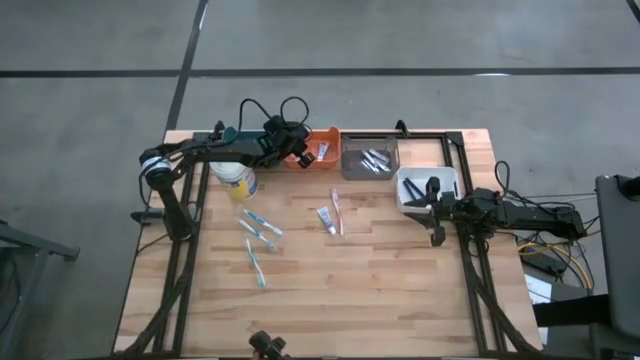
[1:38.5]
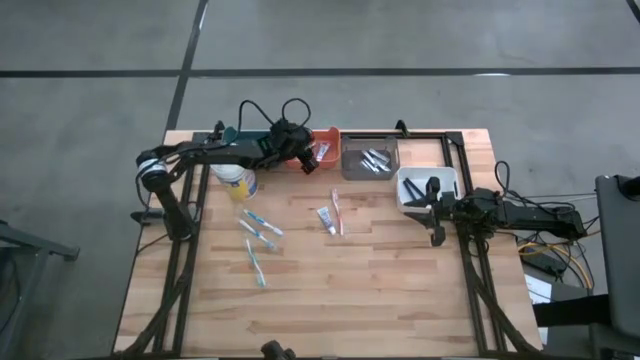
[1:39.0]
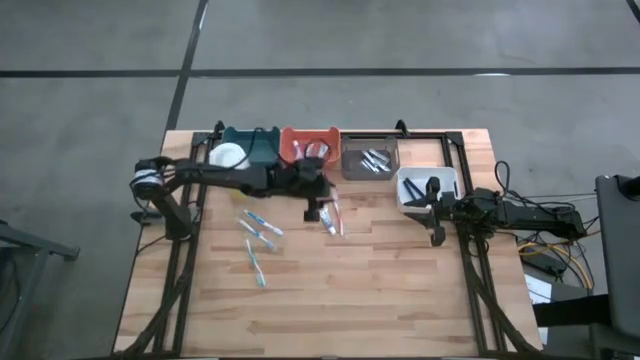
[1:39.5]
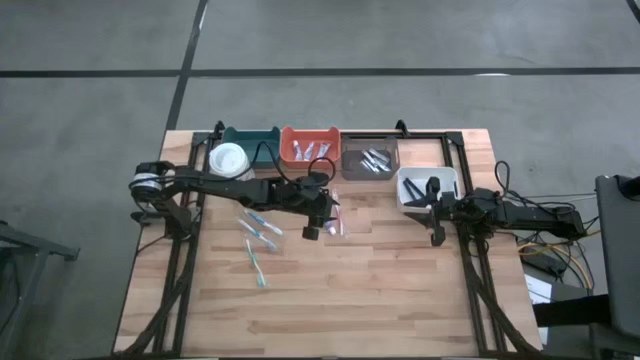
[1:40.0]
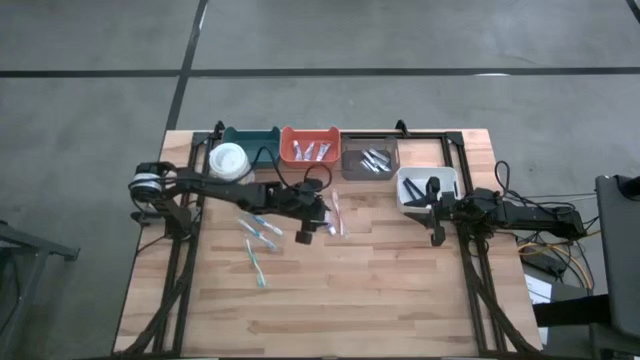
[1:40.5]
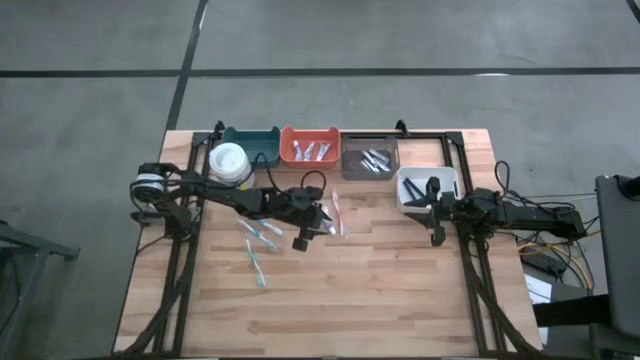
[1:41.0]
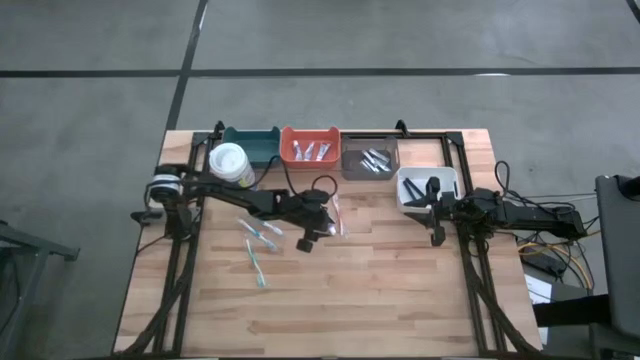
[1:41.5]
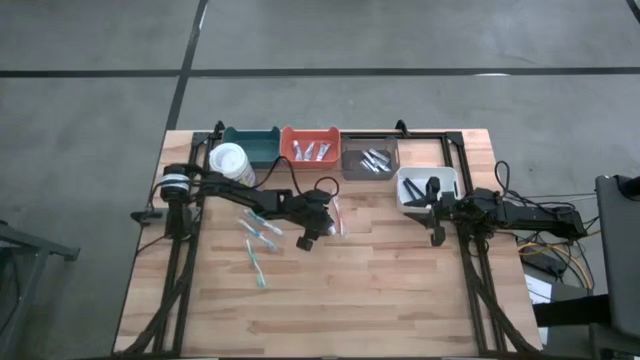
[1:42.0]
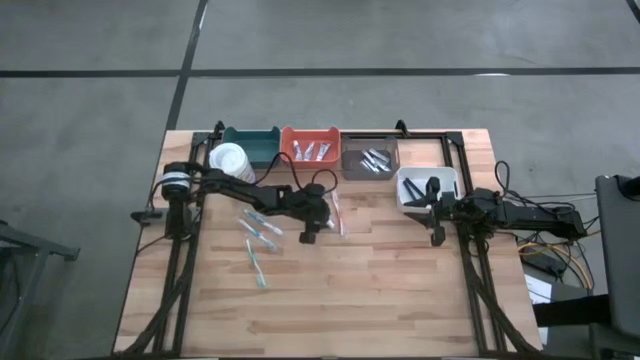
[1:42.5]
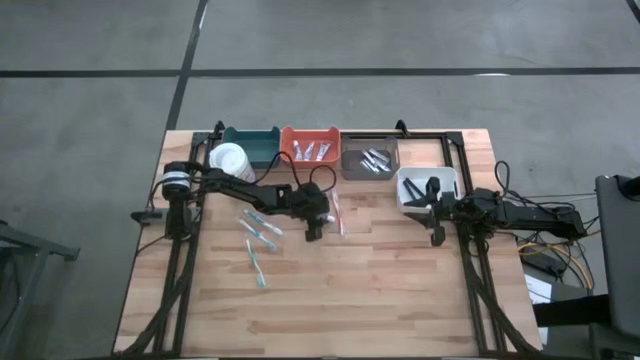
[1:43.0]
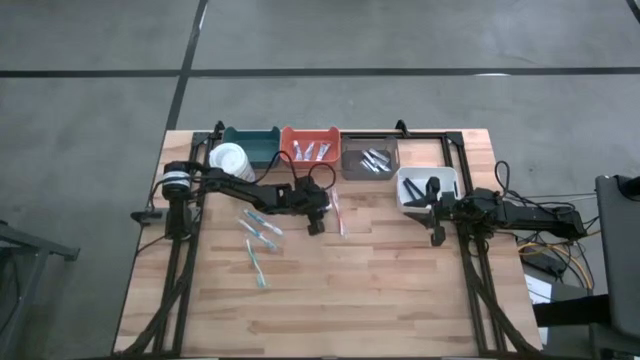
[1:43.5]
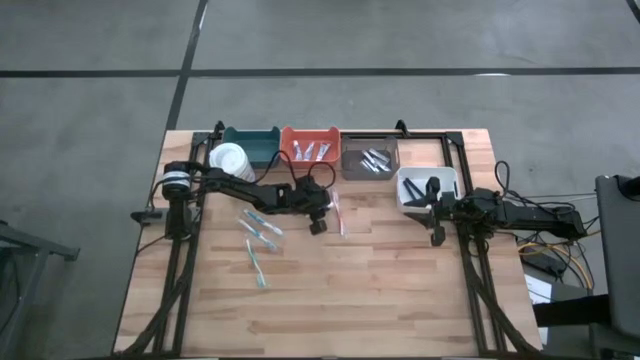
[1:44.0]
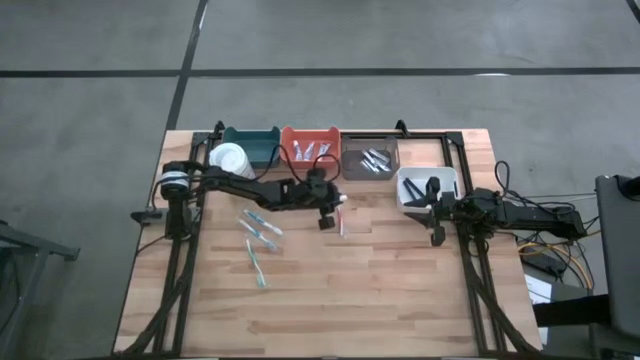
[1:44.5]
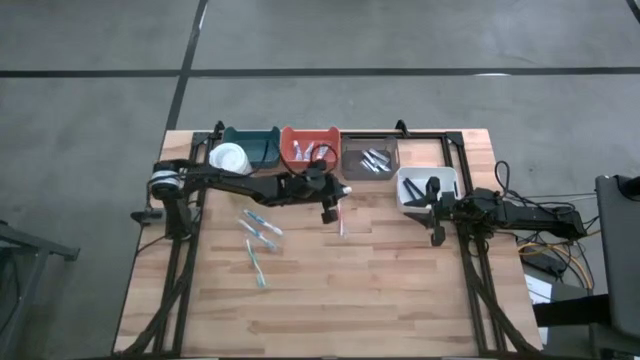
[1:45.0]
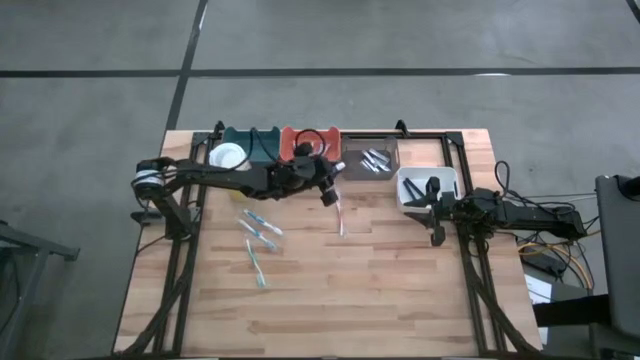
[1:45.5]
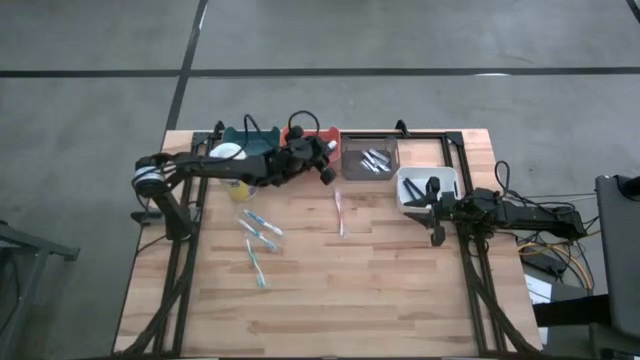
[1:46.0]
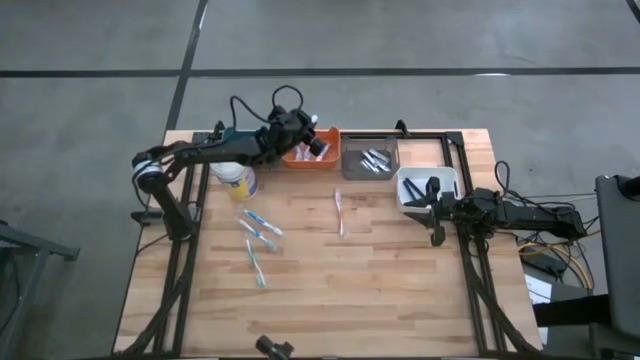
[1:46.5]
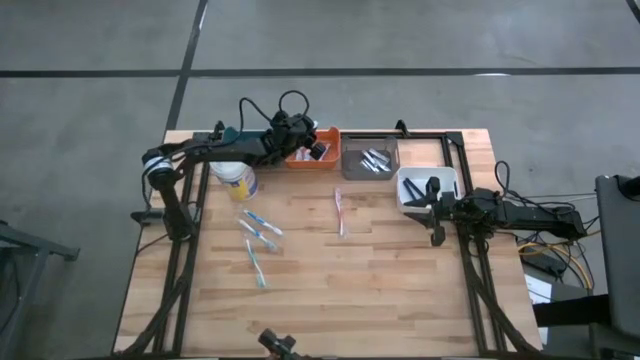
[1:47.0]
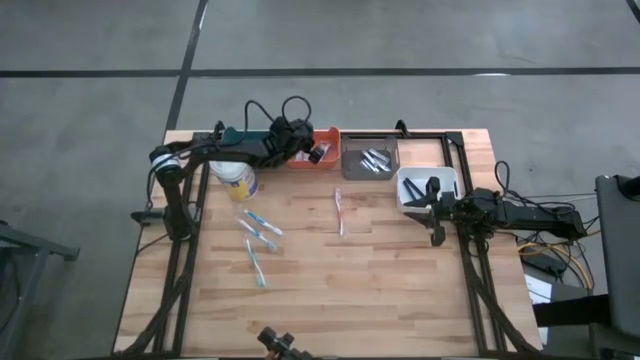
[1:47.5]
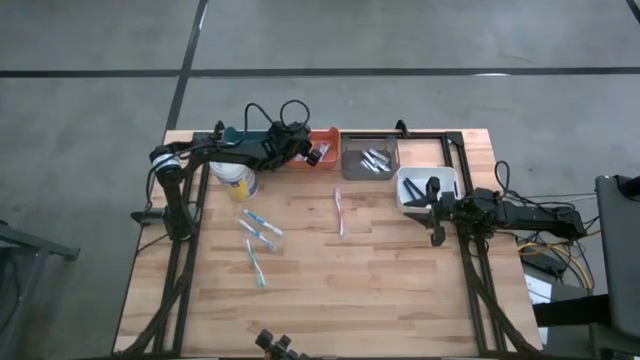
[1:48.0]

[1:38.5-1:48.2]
Task: Pick & Place Travel size toiletries
Put the toothpaste into the orange bin

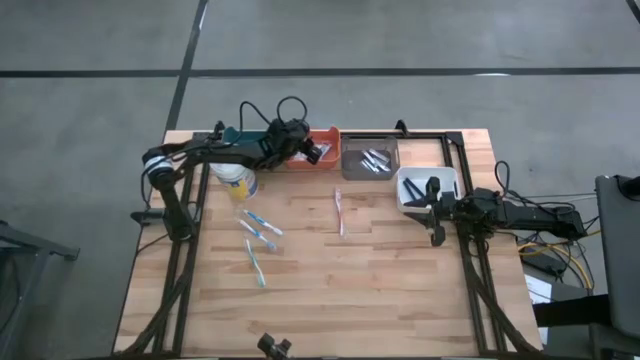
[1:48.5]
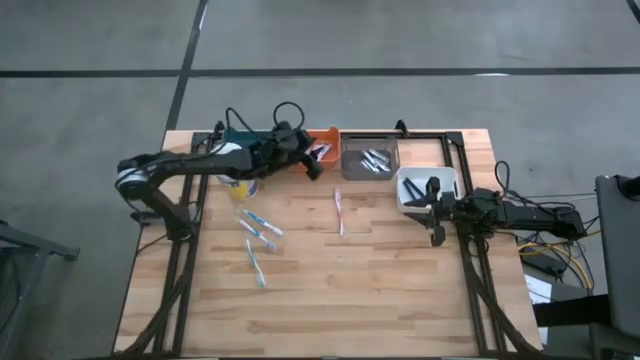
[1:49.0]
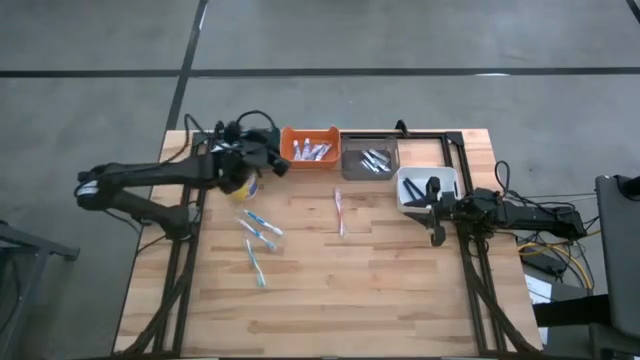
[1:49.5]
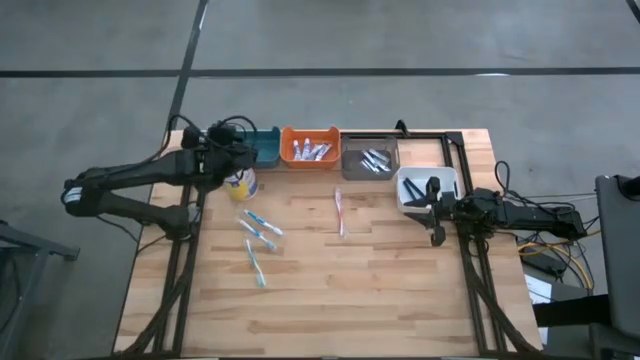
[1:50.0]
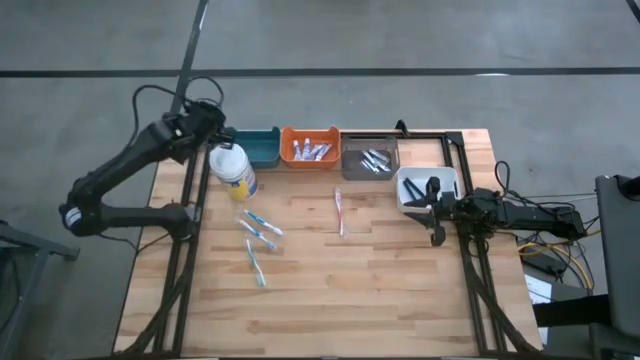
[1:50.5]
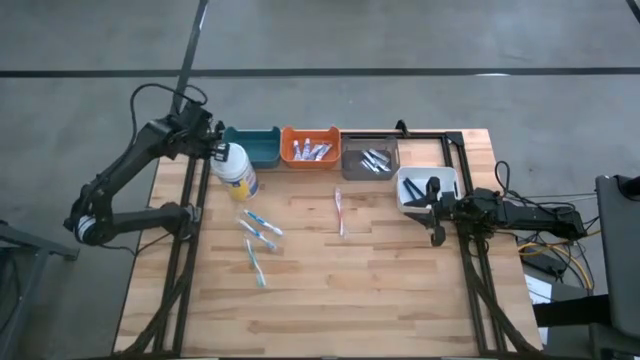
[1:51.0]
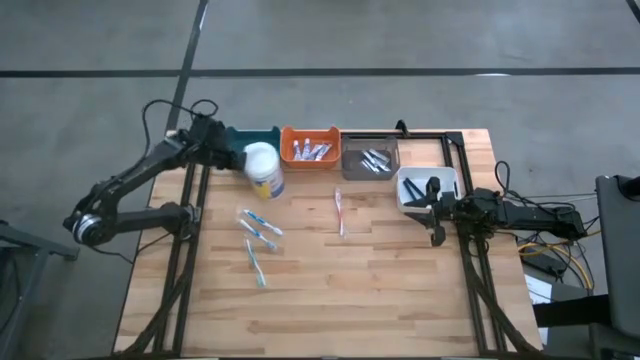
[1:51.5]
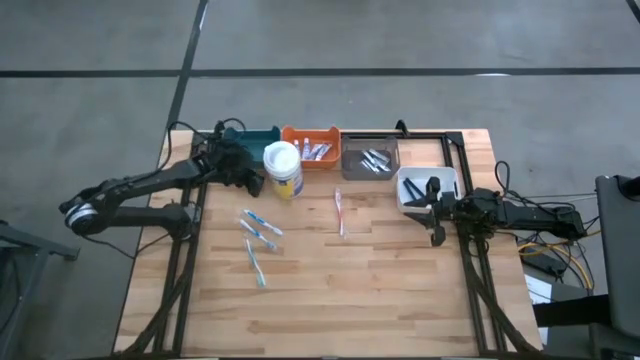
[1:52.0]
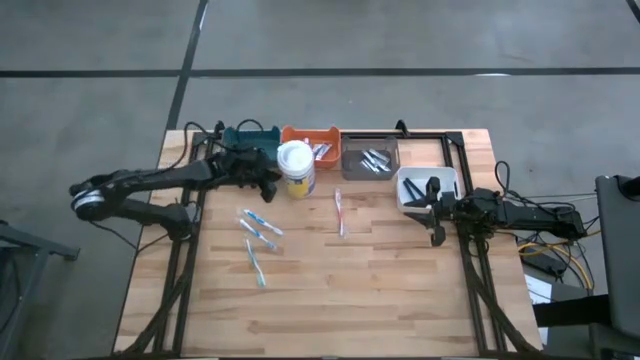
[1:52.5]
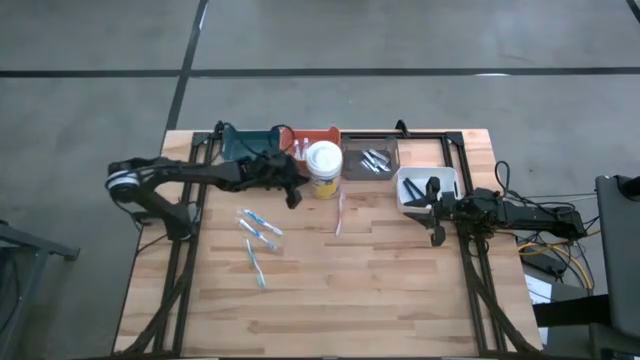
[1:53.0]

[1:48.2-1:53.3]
Move the fisinfectant wipes to the middle of the table

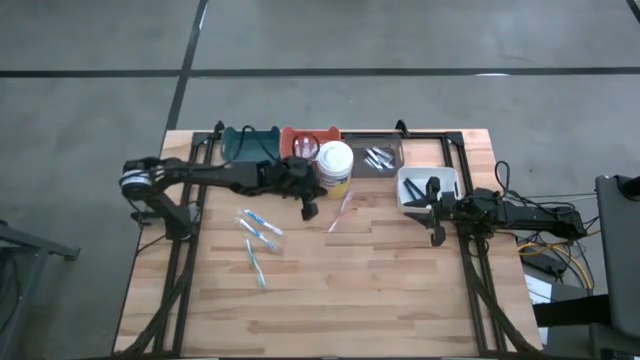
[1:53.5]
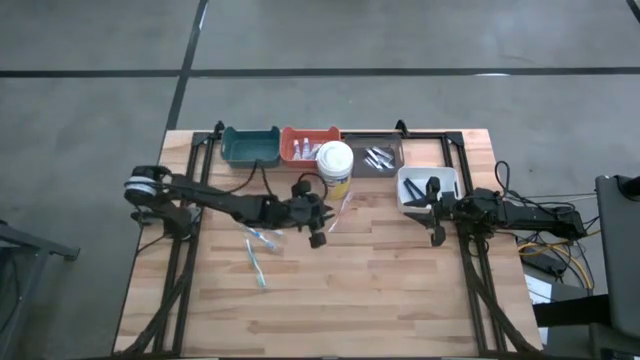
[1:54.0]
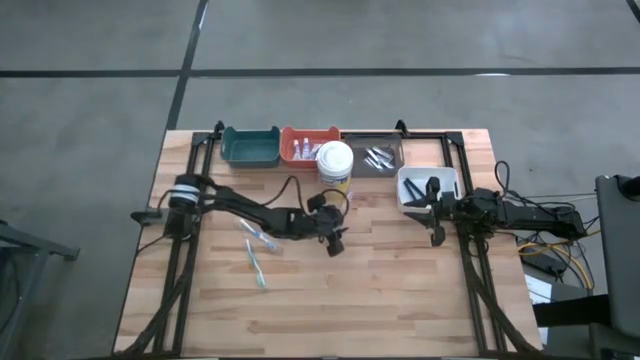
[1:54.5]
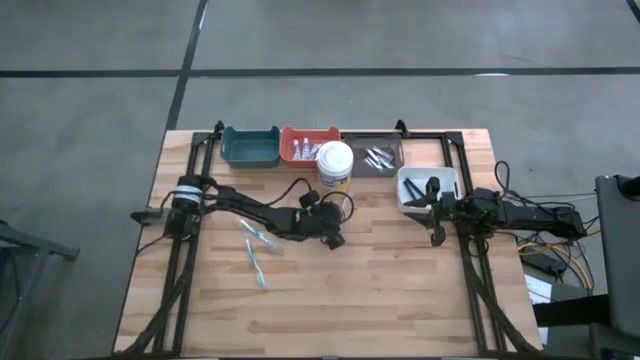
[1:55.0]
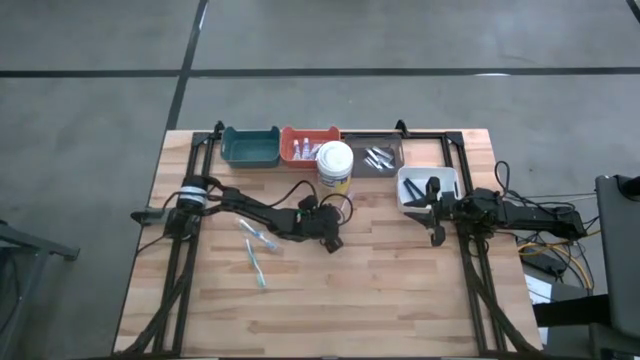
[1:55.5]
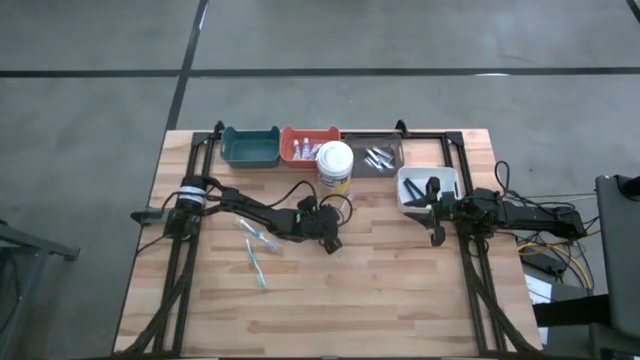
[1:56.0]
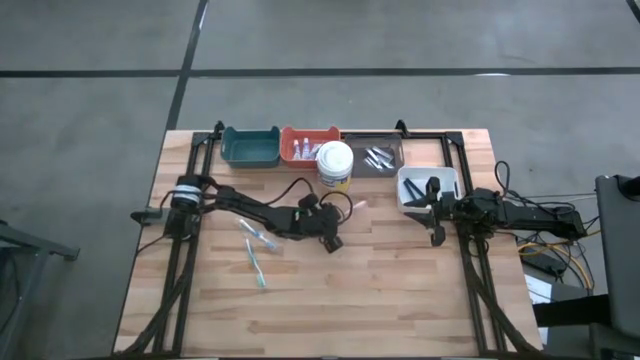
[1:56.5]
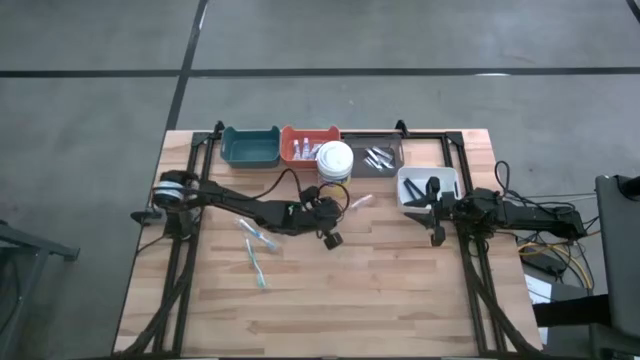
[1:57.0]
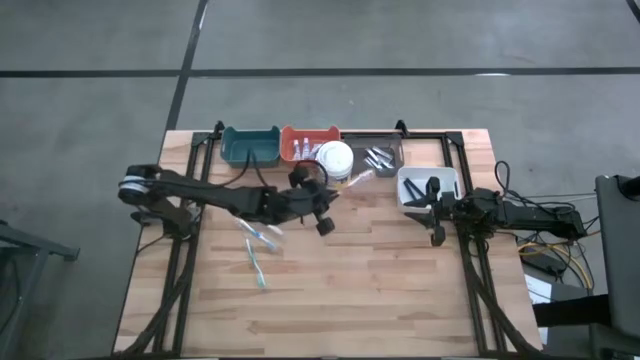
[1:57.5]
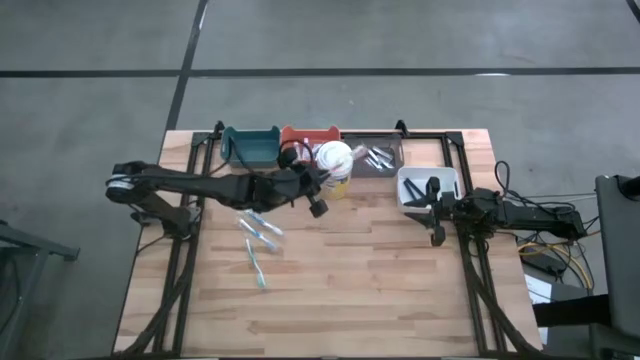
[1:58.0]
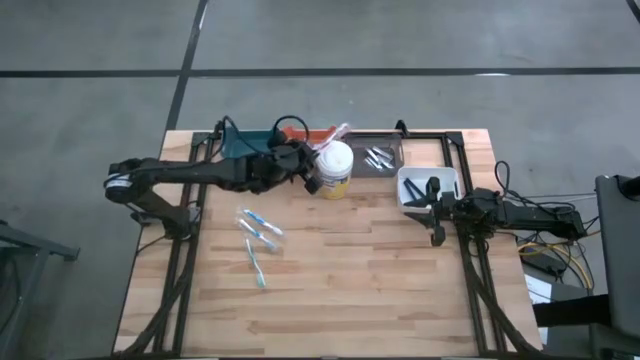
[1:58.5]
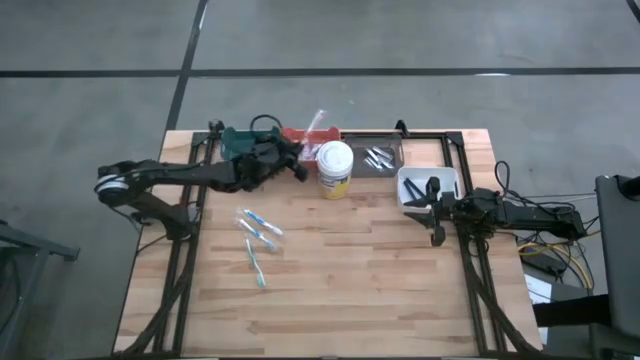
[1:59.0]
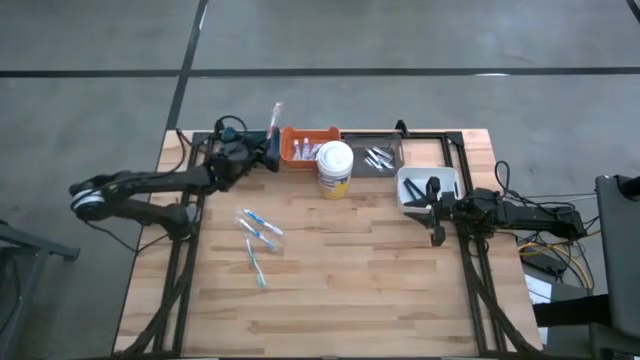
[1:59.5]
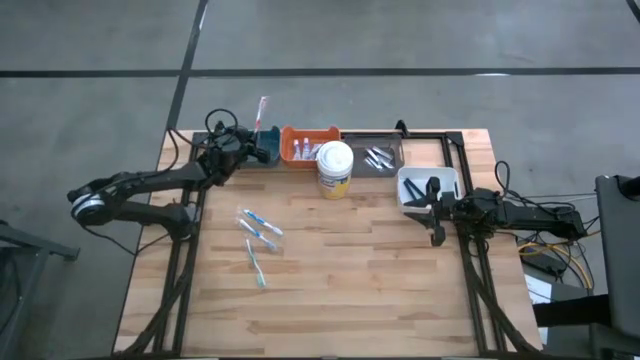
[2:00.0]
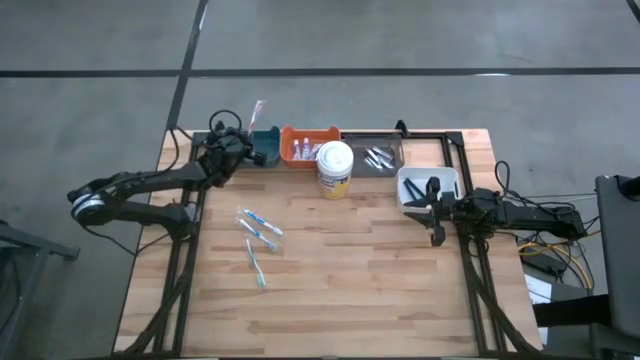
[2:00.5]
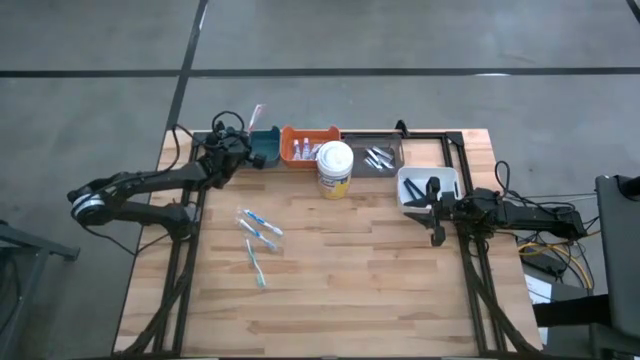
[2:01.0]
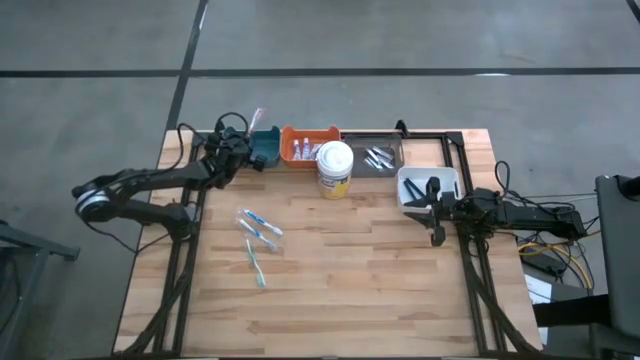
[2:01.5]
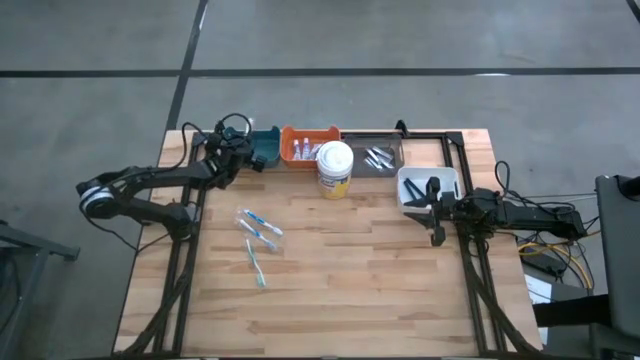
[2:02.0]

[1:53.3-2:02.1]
Put the red toothbrush into the blue bin
